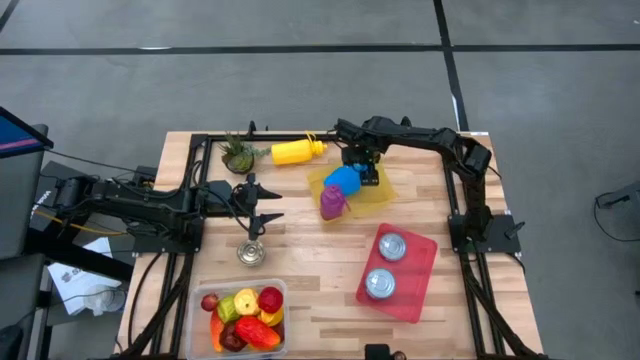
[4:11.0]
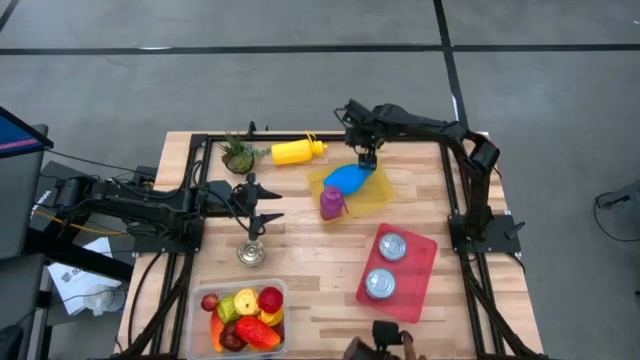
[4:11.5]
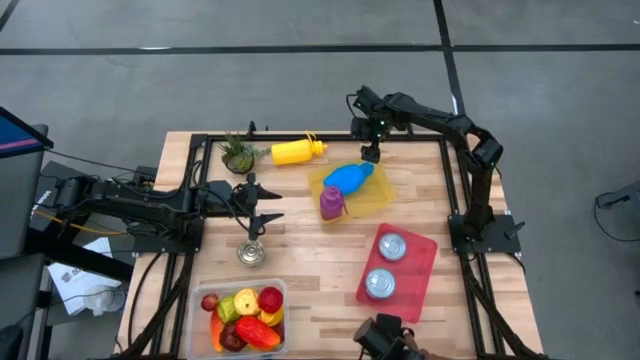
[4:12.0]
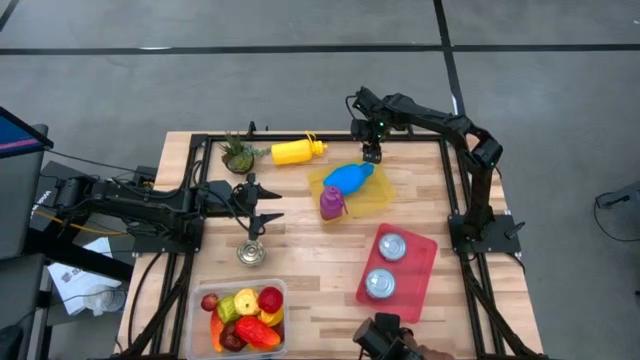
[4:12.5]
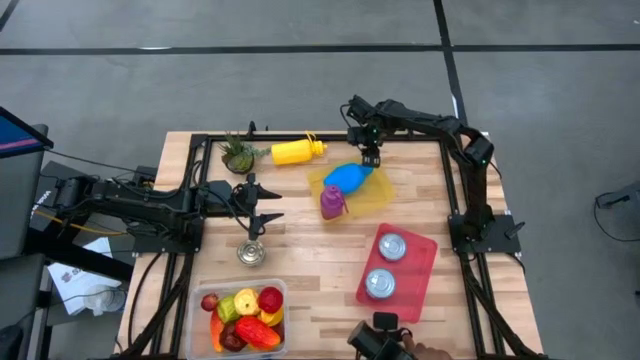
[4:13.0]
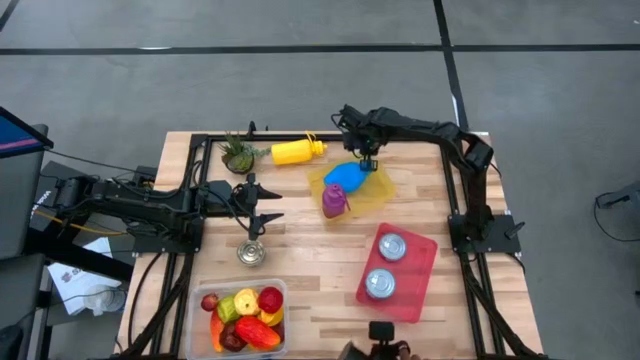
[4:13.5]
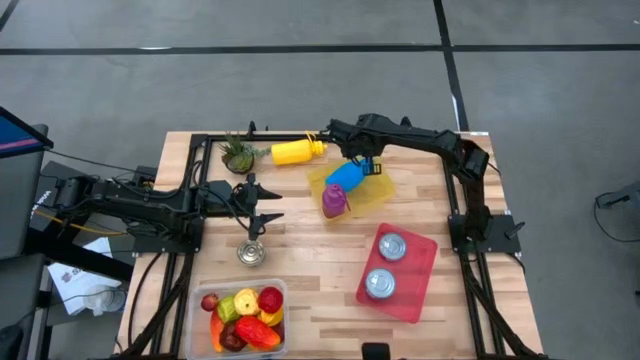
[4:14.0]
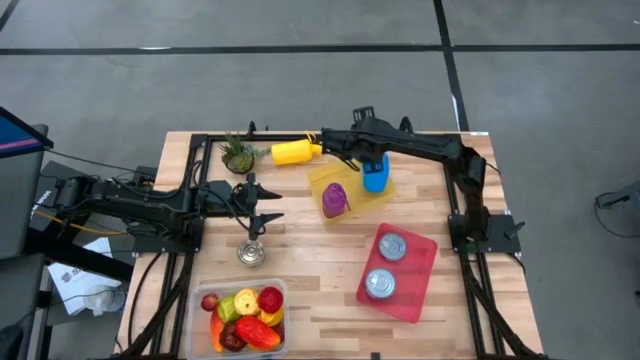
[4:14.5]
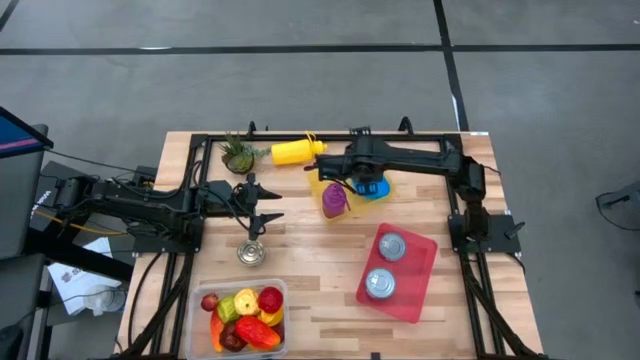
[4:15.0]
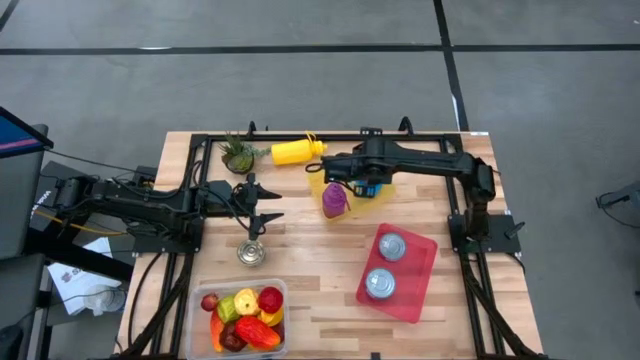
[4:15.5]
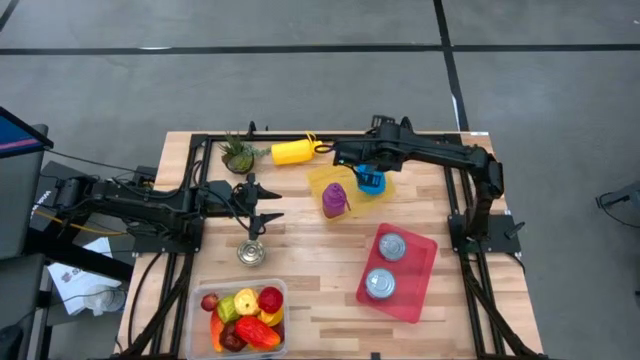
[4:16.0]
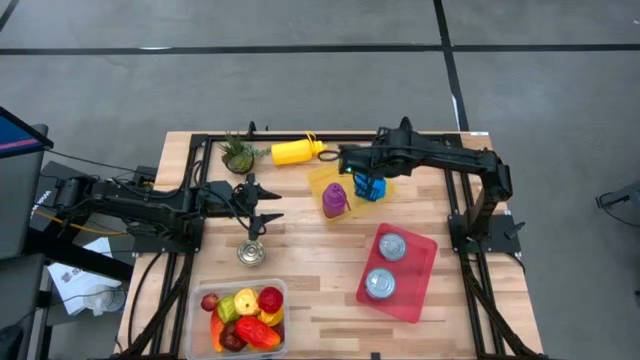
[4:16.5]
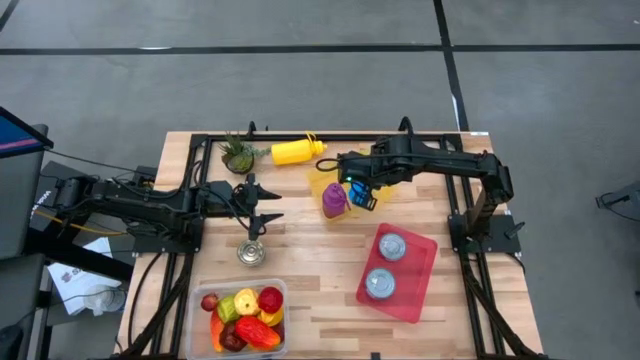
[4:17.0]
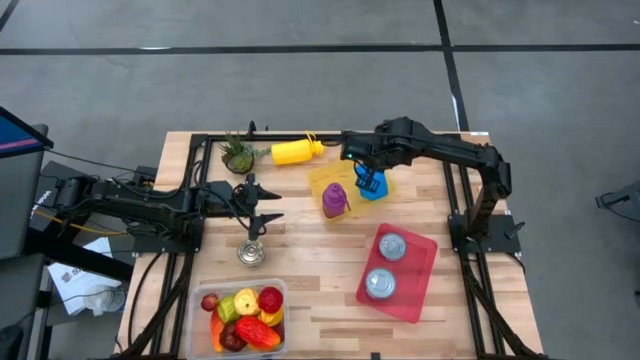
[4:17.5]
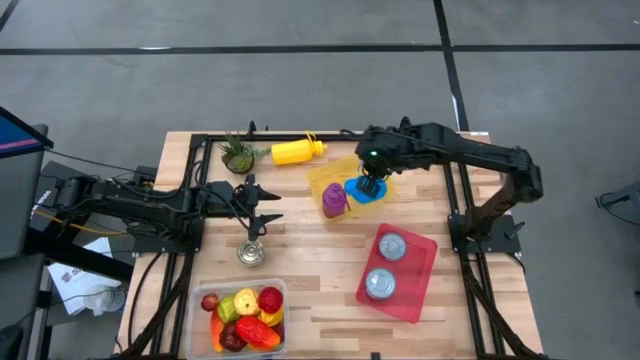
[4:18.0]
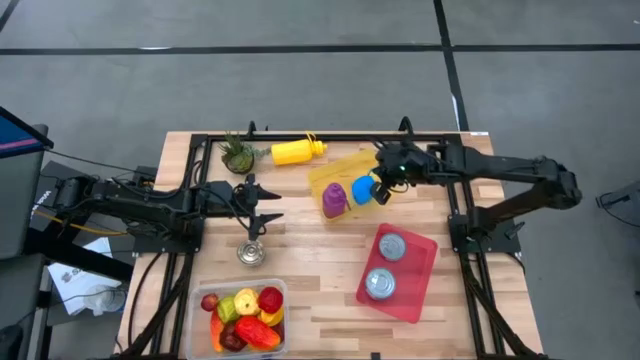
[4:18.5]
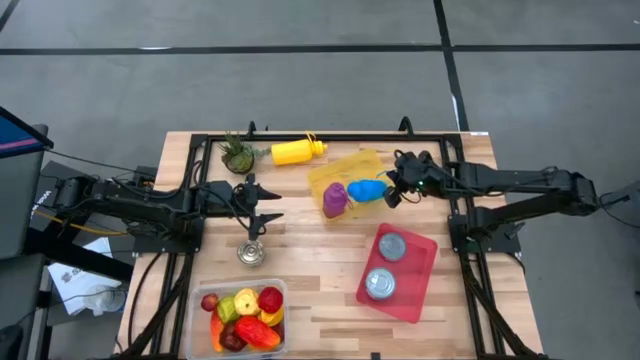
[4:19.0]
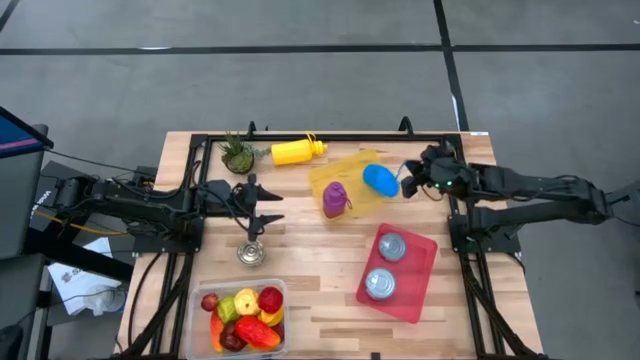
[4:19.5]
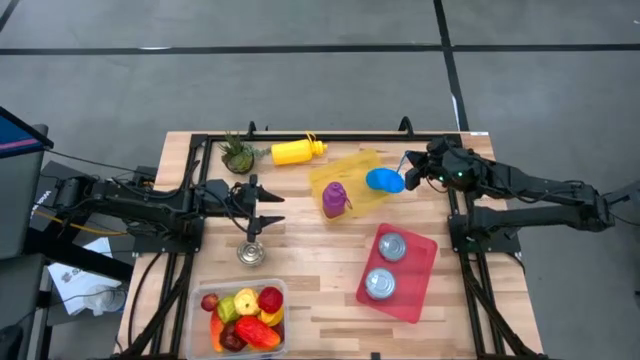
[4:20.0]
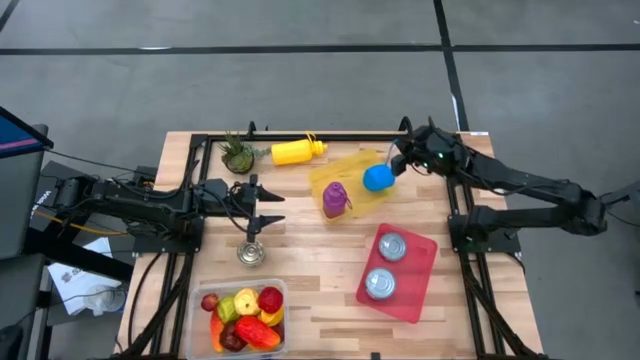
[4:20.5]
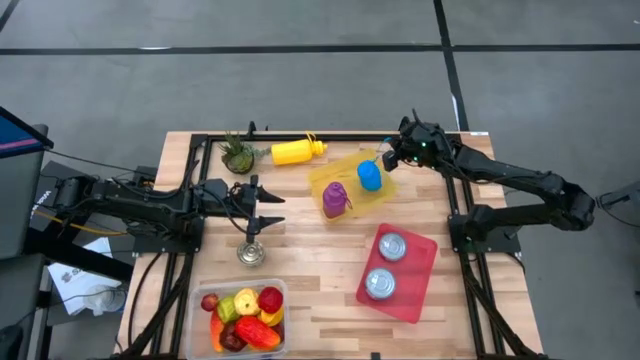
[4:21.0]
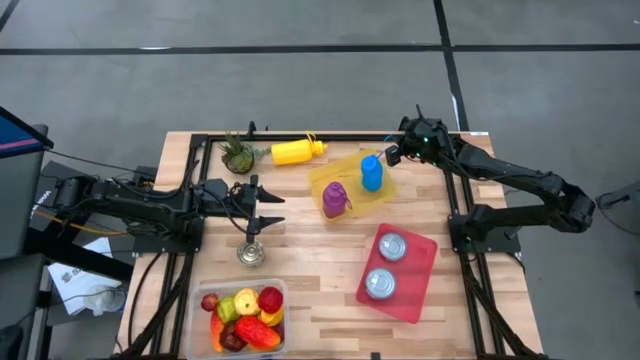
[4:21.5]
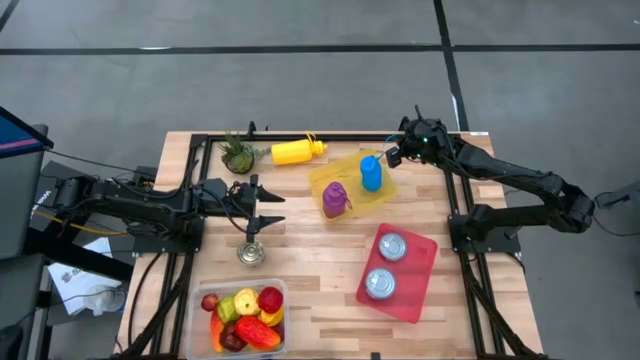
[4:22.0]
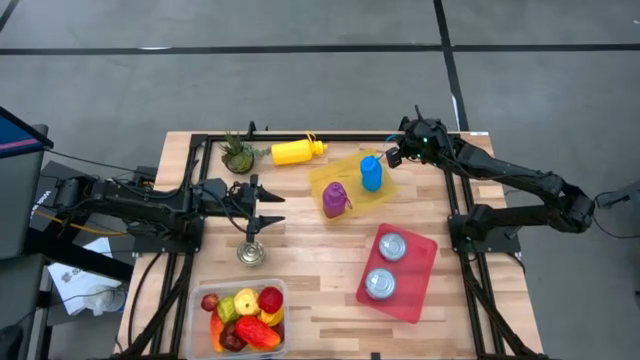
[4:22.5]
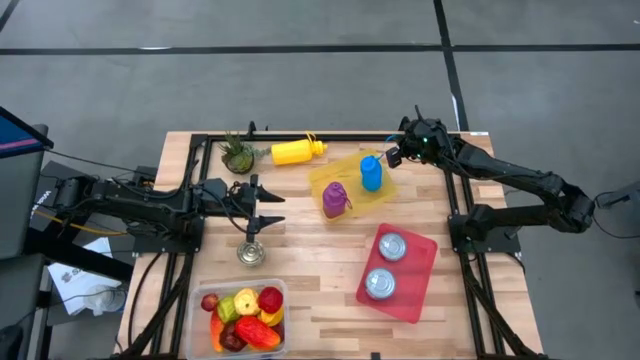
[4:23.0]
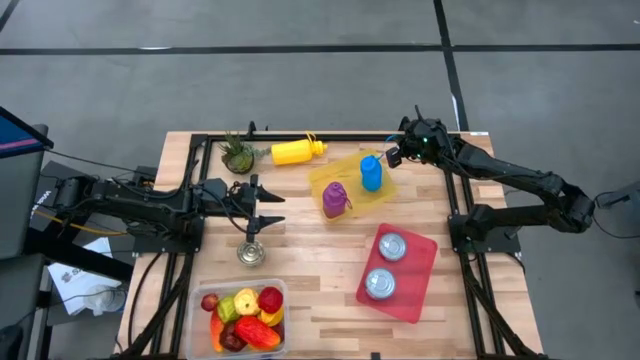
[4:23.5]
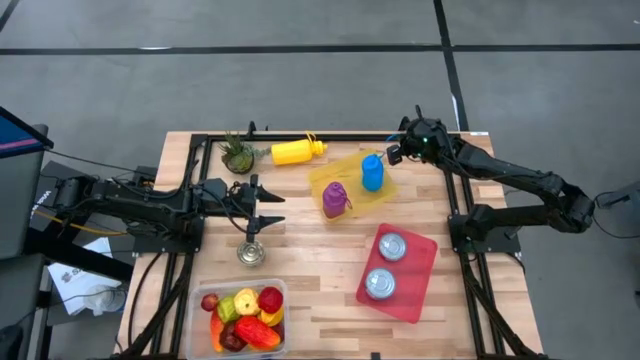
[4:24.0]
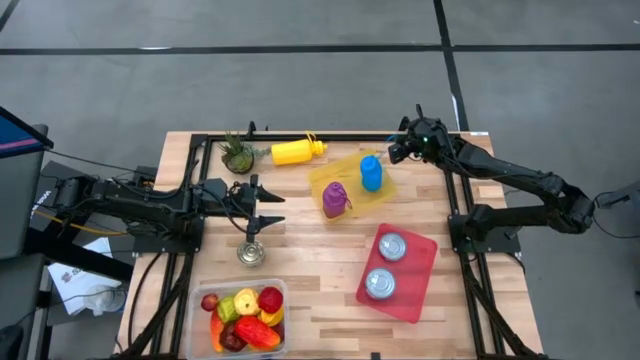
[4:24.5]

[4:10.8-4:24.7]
Task: Pick & Place Food Item
Adjust the blue tumbler in the yellow bin

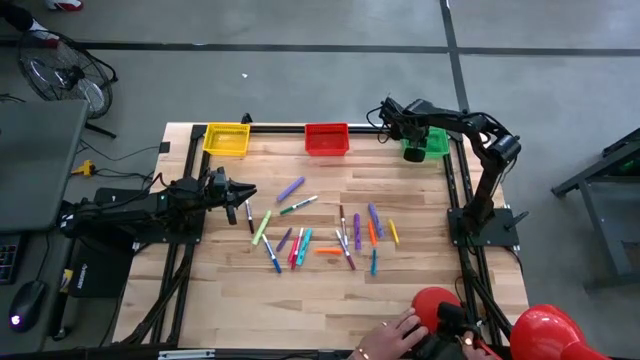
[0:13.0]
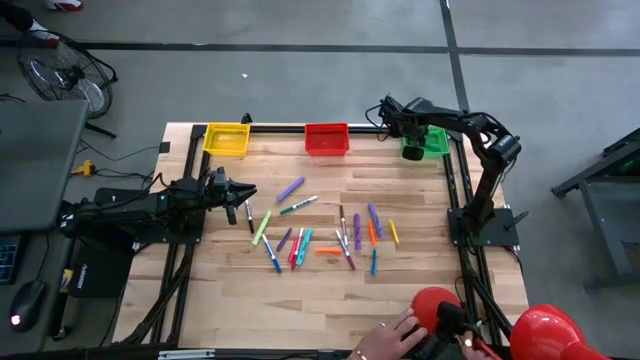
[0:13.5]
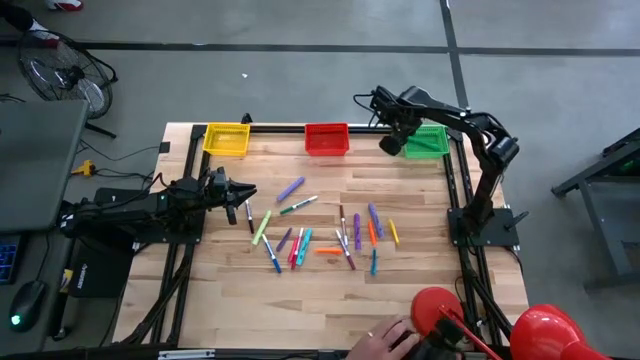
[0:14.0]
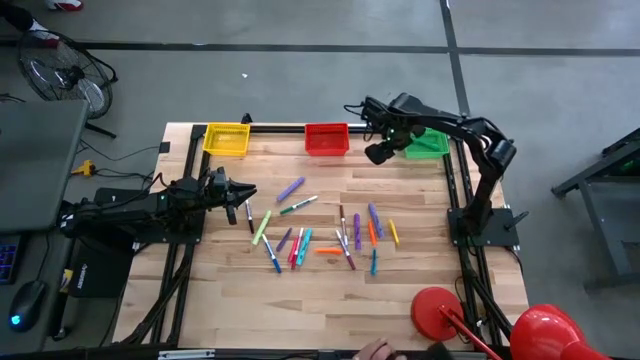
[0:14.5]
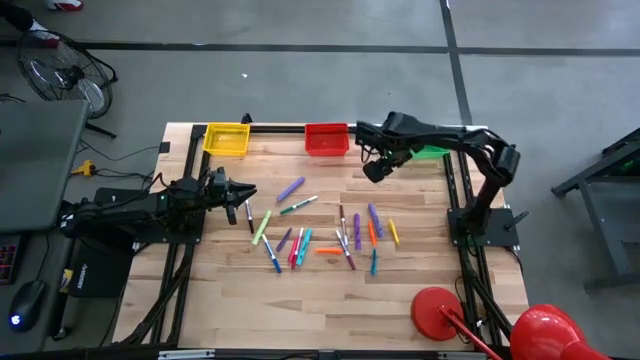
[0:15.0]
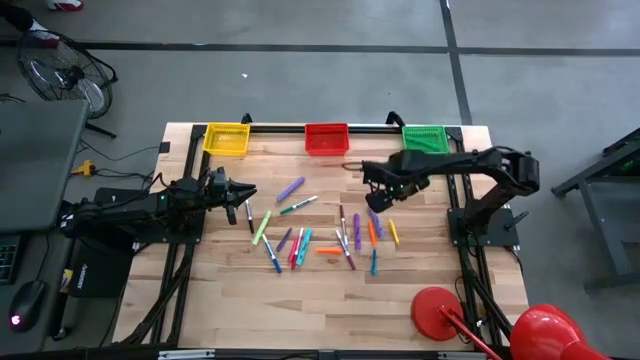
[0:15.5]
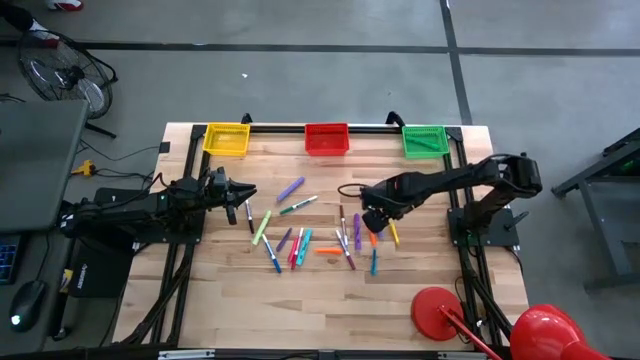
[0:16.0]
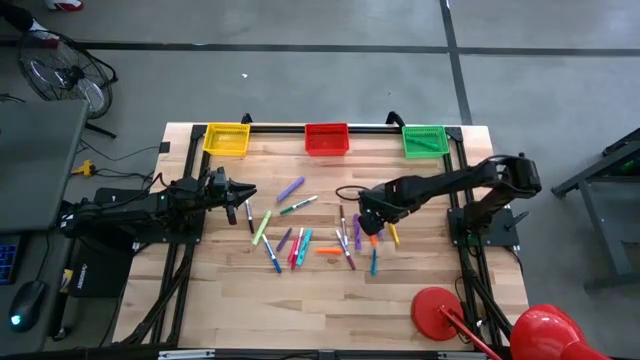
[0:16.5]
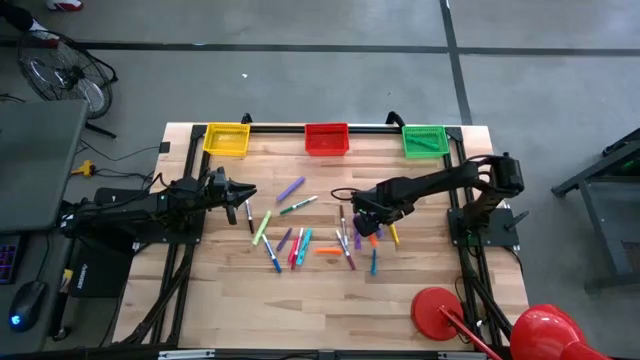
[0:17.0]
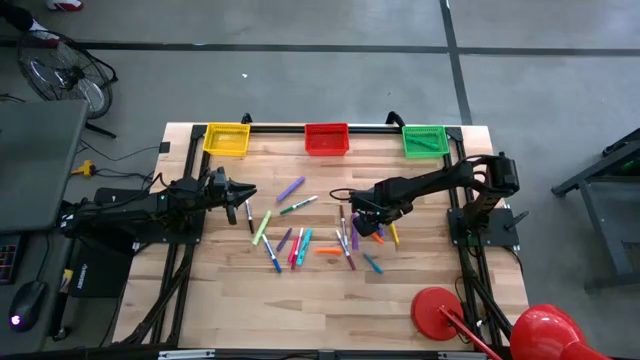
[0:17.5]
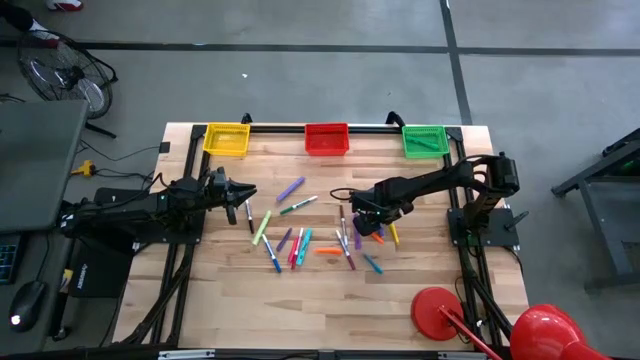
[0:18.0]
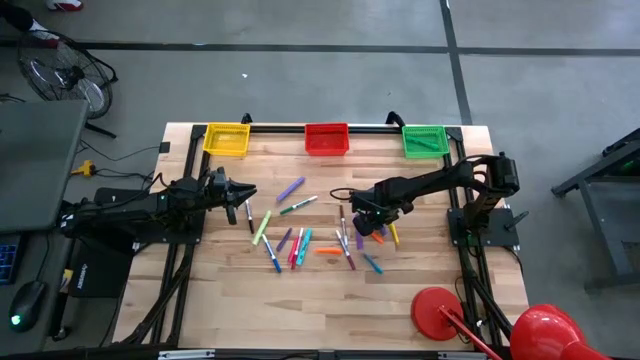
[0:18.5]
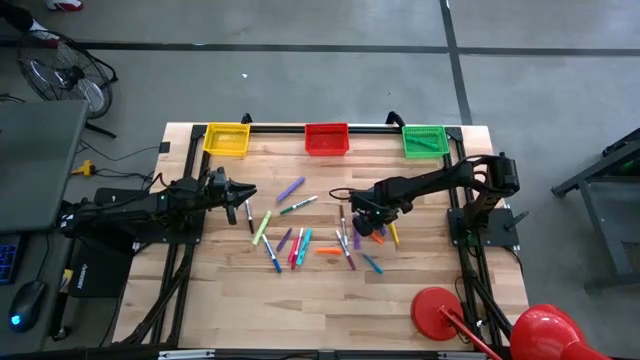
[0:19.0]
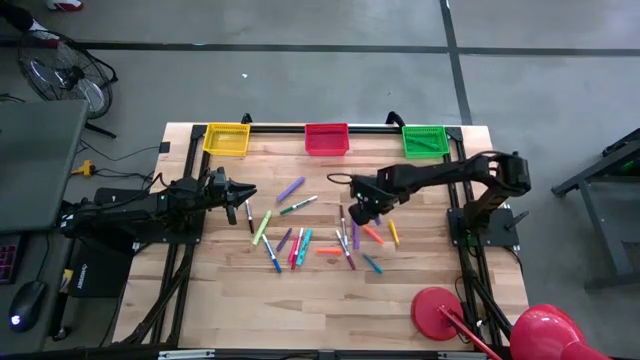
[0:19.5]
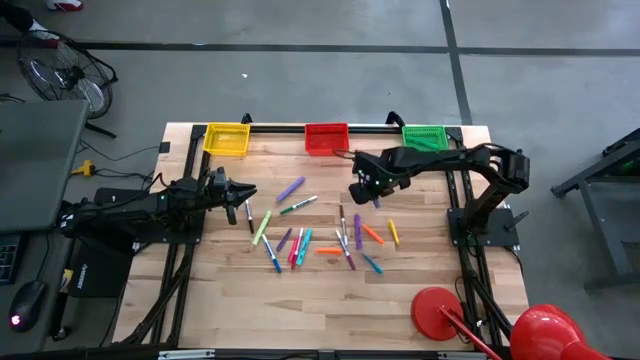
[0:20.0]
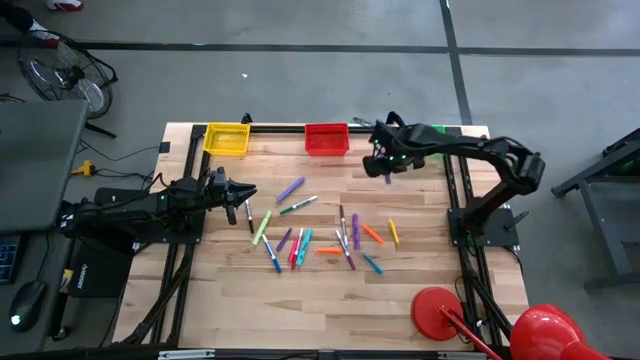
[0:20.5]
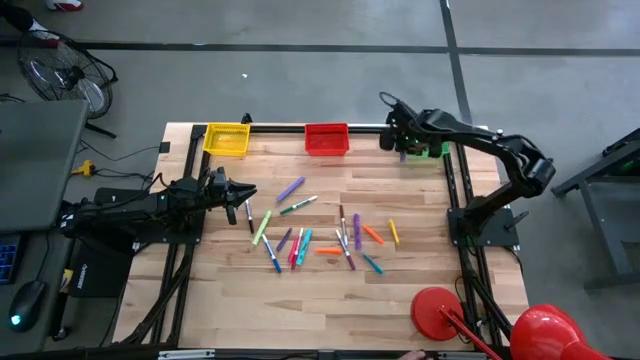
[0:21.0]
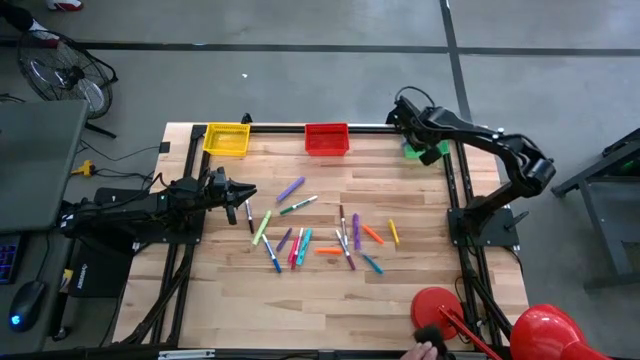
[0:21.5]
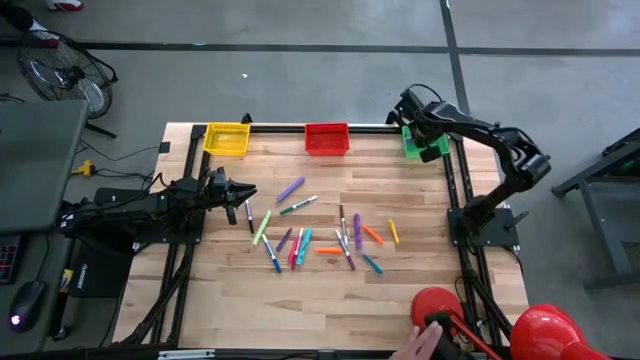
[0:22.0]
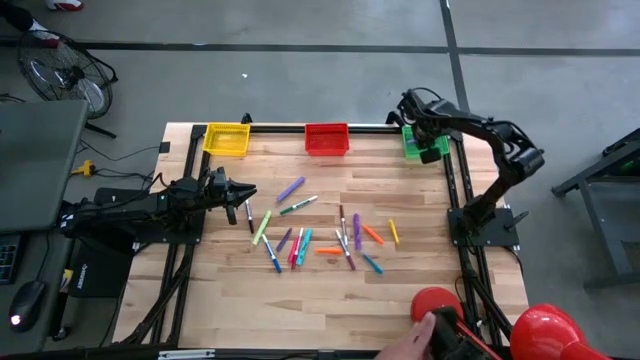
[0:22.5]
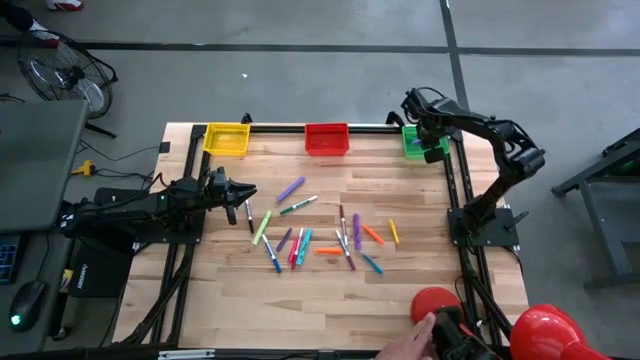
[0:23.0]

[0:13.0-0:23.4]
Task: Pick & Place Markers
Put the violet highlighter into the green bin
